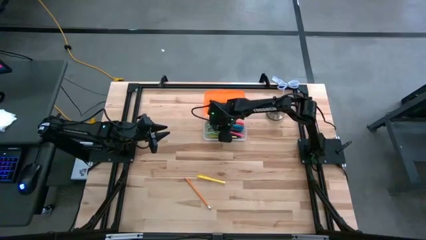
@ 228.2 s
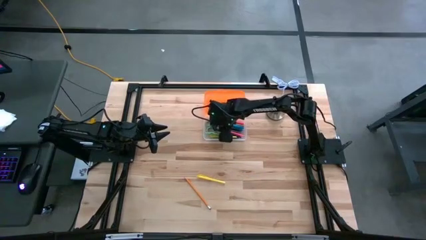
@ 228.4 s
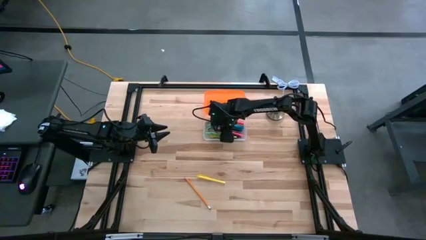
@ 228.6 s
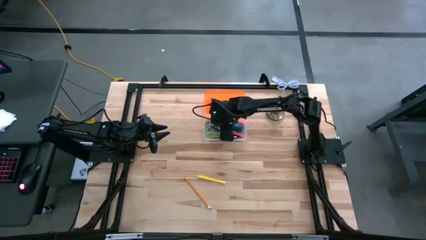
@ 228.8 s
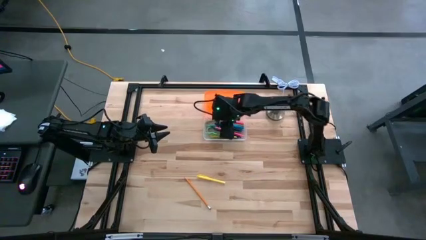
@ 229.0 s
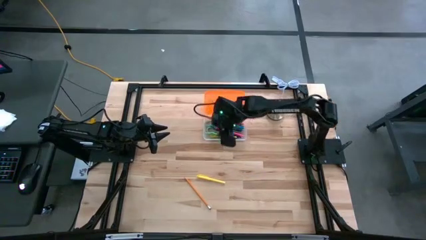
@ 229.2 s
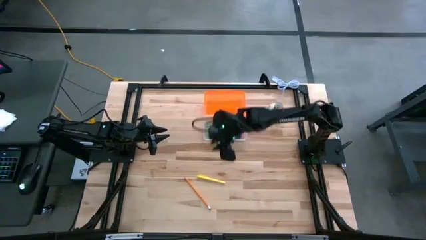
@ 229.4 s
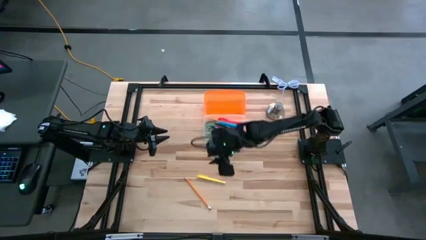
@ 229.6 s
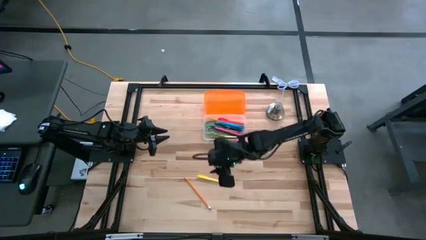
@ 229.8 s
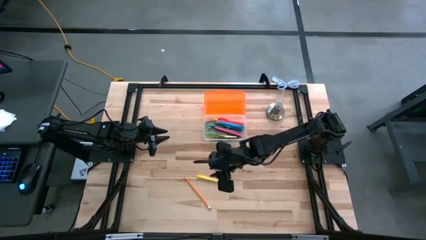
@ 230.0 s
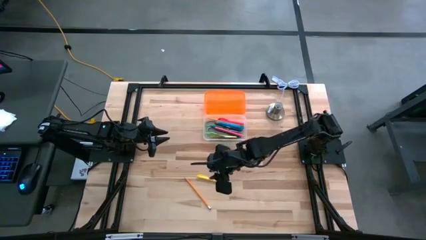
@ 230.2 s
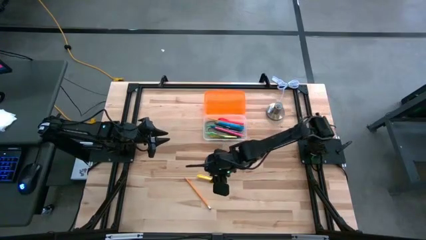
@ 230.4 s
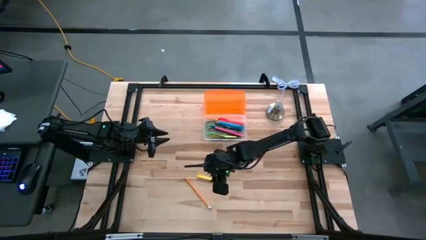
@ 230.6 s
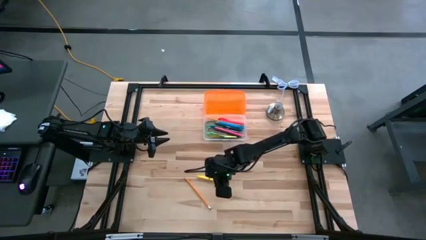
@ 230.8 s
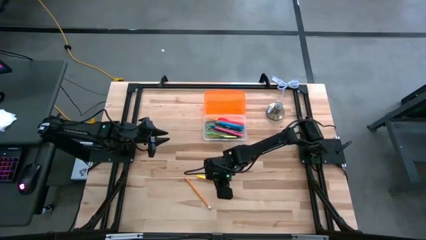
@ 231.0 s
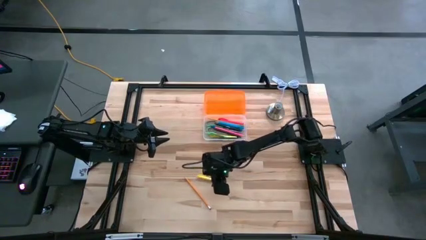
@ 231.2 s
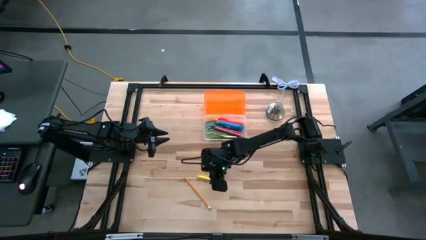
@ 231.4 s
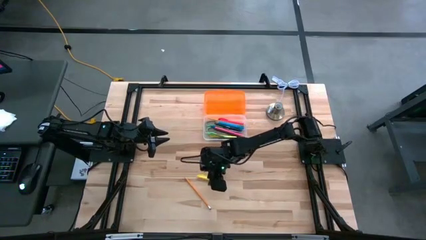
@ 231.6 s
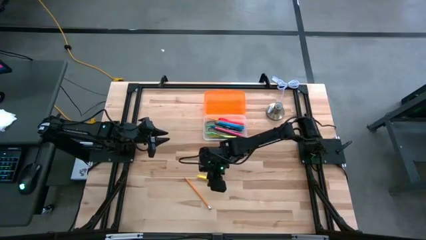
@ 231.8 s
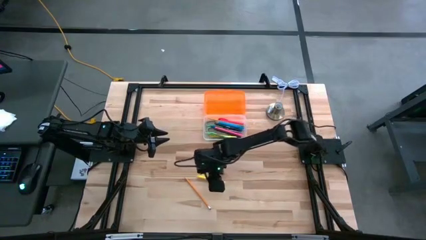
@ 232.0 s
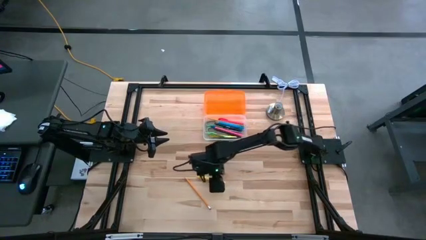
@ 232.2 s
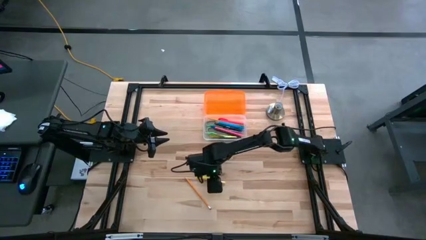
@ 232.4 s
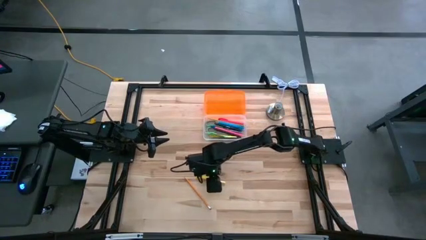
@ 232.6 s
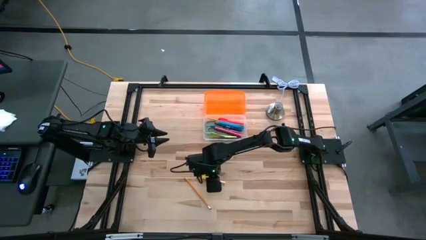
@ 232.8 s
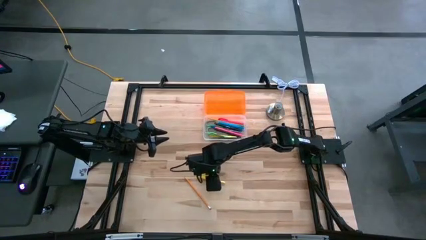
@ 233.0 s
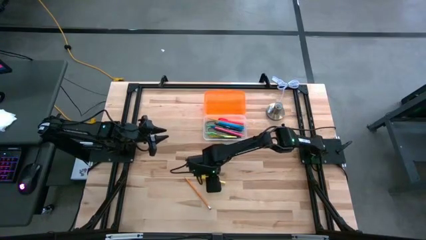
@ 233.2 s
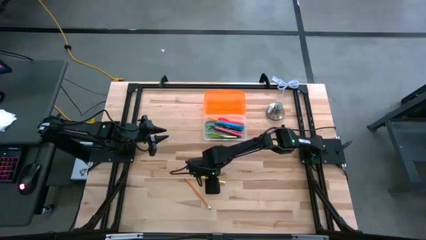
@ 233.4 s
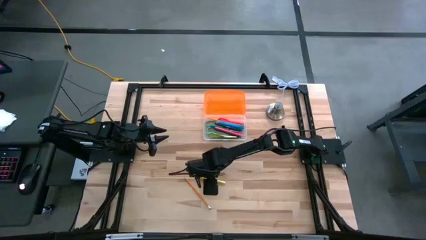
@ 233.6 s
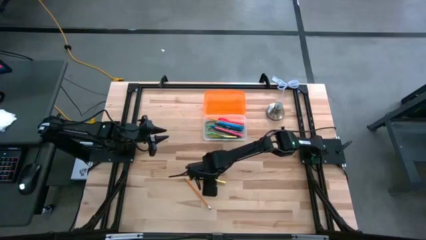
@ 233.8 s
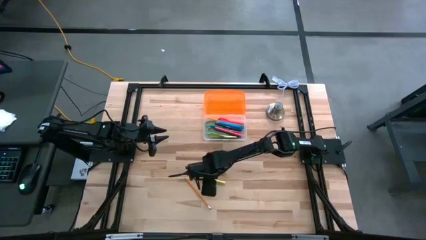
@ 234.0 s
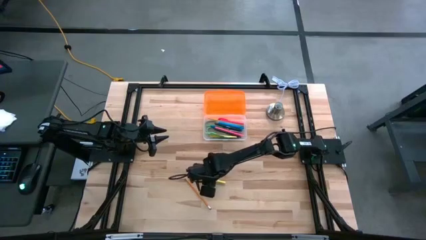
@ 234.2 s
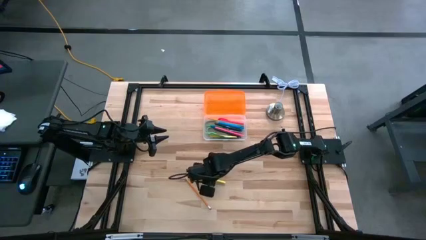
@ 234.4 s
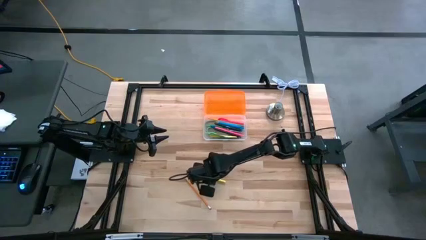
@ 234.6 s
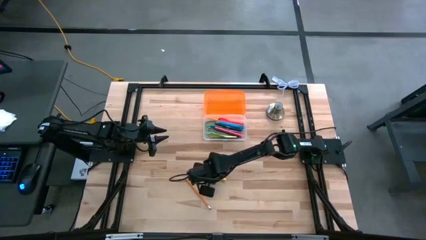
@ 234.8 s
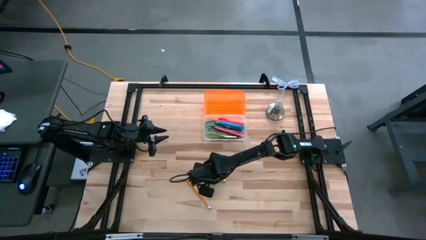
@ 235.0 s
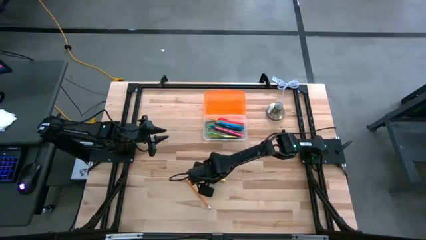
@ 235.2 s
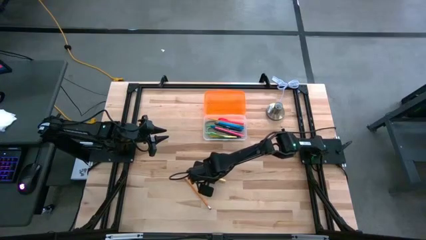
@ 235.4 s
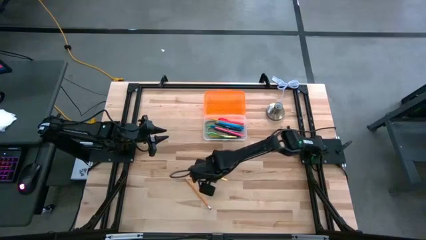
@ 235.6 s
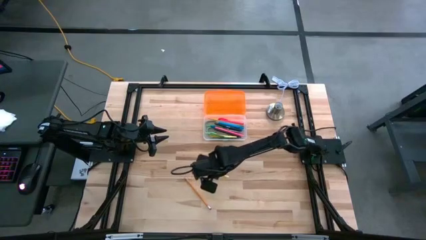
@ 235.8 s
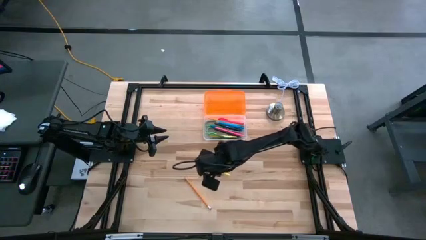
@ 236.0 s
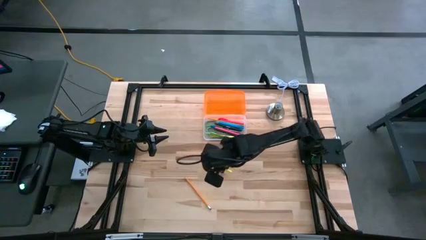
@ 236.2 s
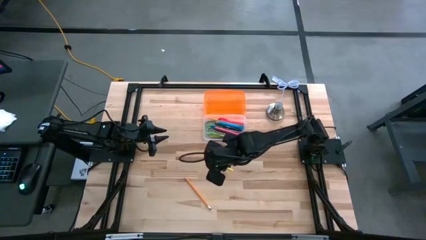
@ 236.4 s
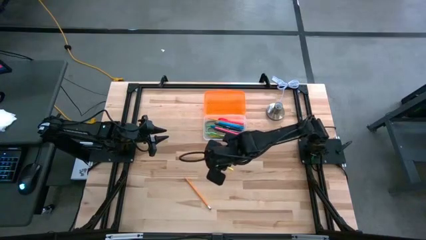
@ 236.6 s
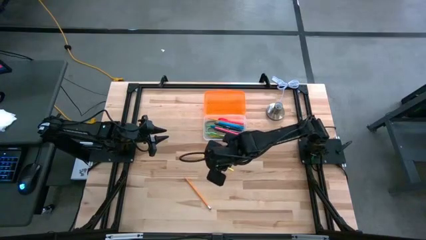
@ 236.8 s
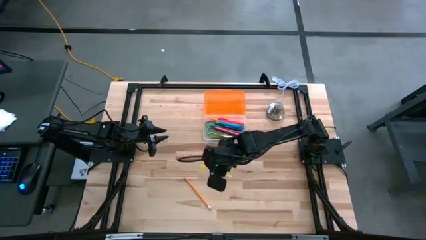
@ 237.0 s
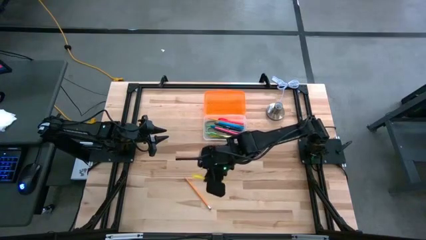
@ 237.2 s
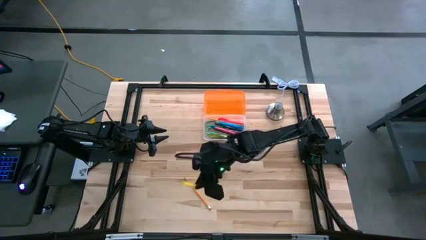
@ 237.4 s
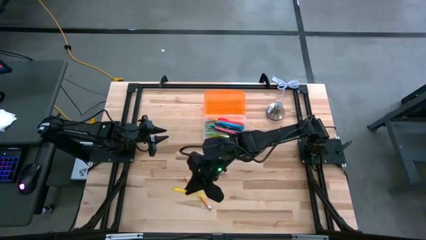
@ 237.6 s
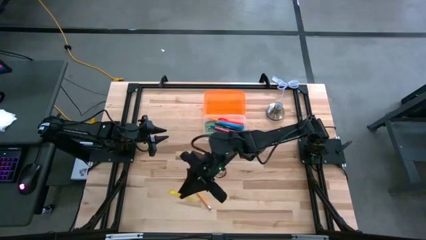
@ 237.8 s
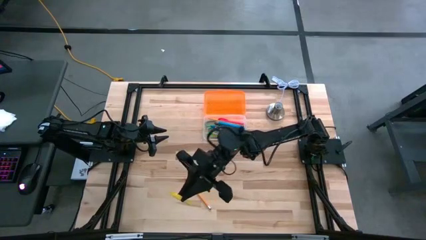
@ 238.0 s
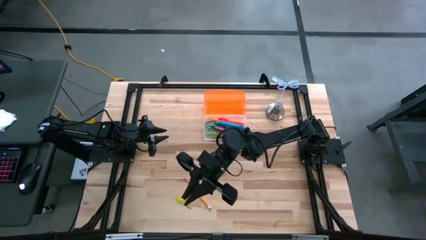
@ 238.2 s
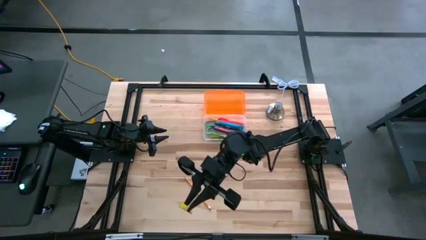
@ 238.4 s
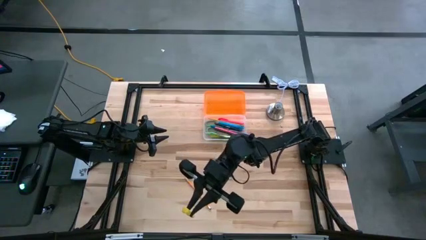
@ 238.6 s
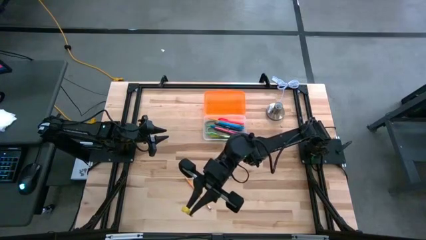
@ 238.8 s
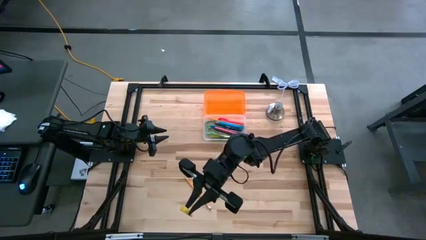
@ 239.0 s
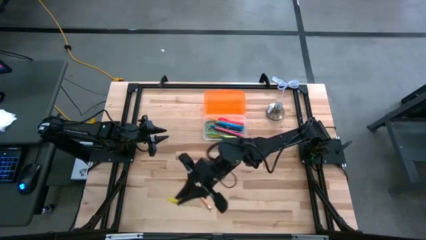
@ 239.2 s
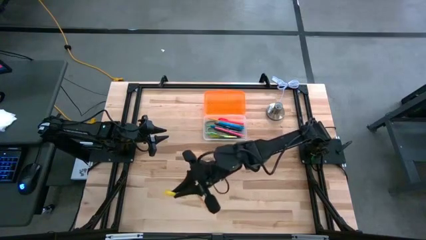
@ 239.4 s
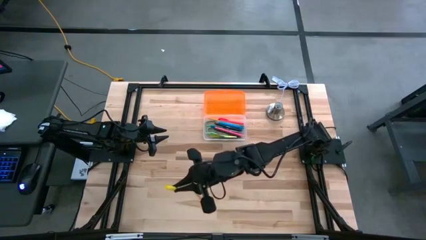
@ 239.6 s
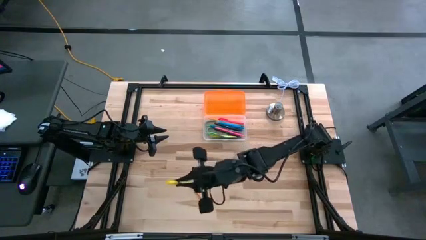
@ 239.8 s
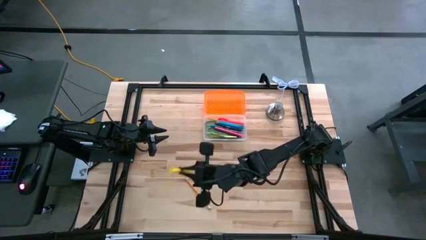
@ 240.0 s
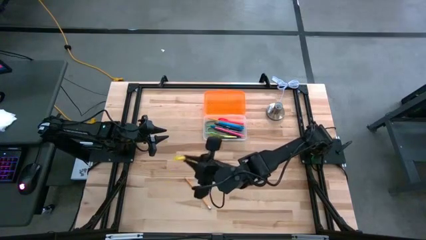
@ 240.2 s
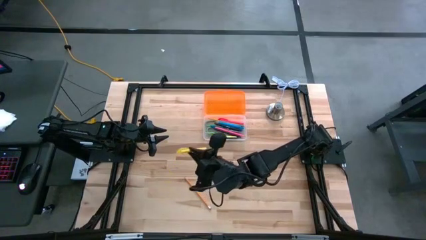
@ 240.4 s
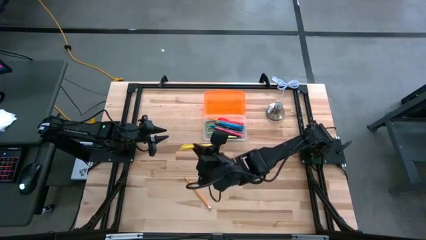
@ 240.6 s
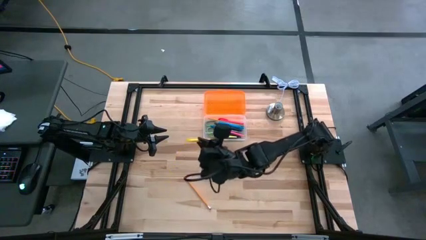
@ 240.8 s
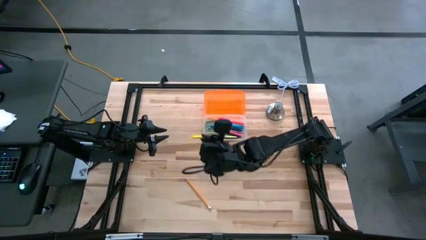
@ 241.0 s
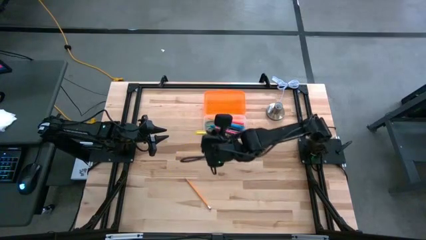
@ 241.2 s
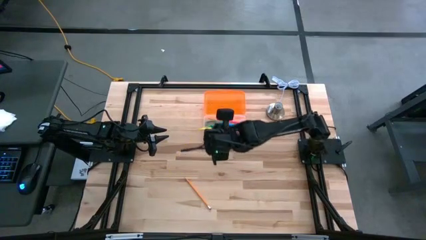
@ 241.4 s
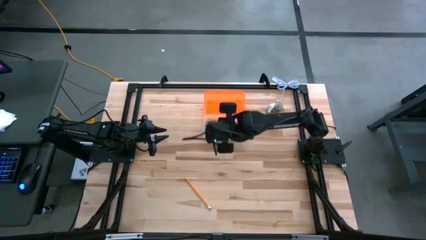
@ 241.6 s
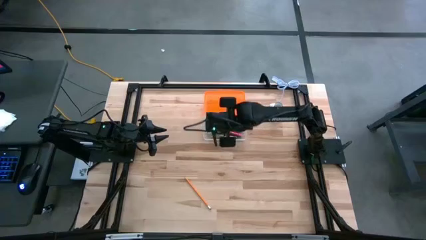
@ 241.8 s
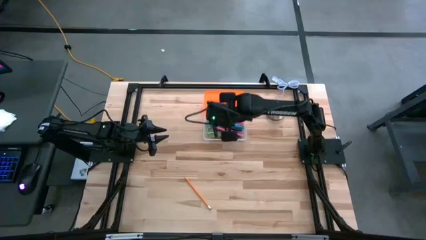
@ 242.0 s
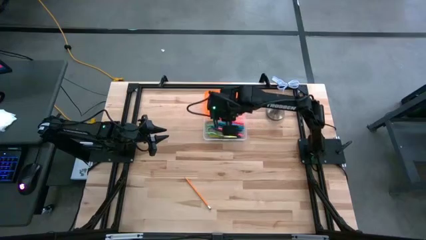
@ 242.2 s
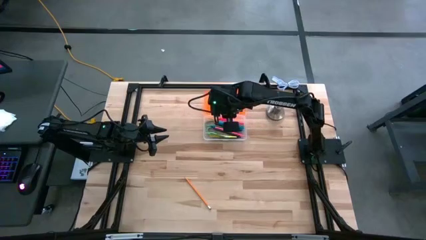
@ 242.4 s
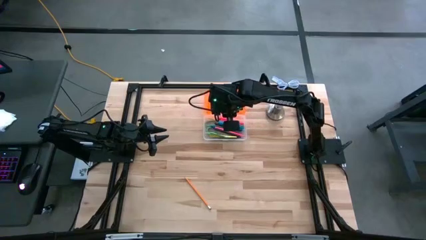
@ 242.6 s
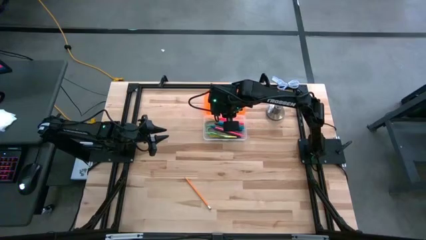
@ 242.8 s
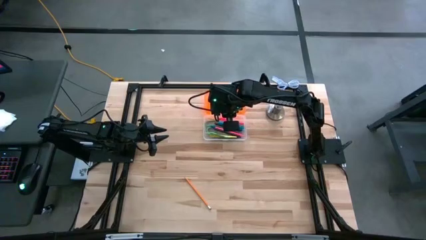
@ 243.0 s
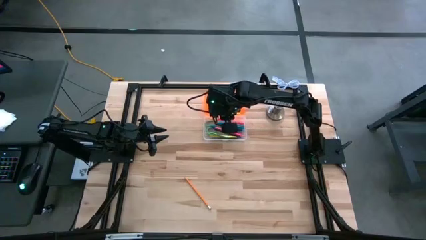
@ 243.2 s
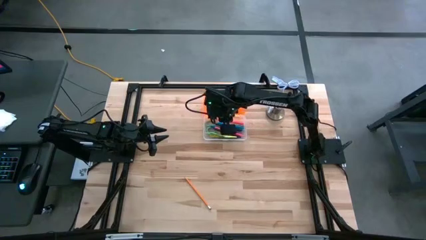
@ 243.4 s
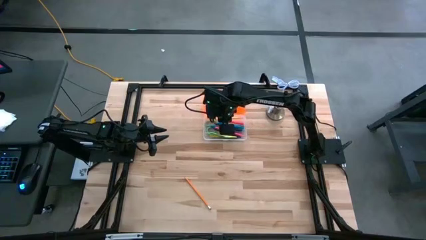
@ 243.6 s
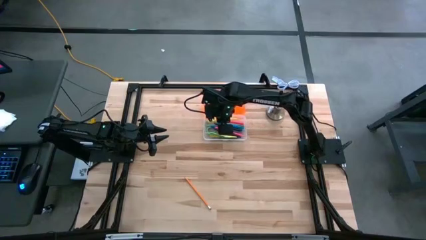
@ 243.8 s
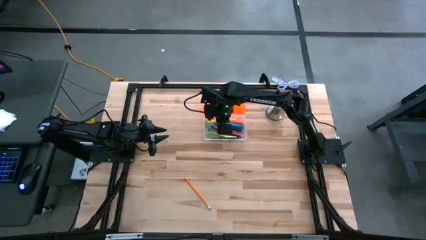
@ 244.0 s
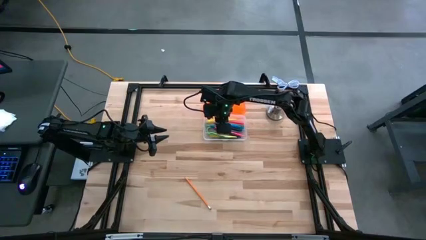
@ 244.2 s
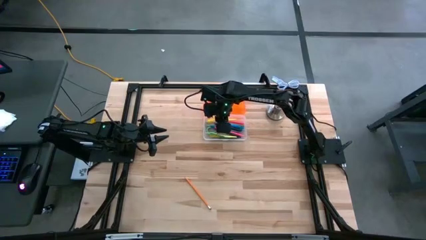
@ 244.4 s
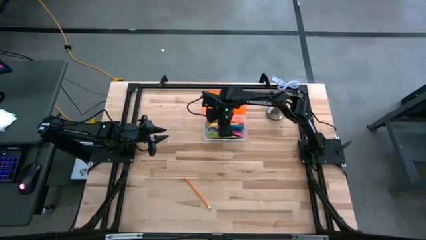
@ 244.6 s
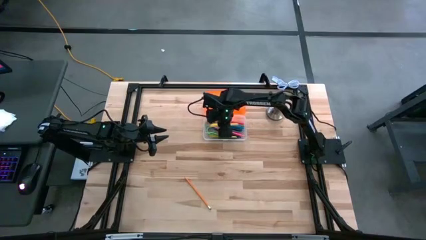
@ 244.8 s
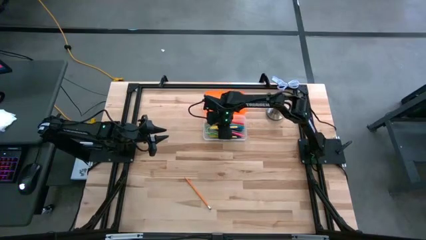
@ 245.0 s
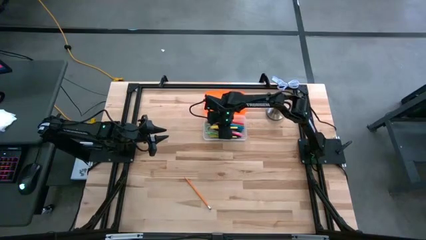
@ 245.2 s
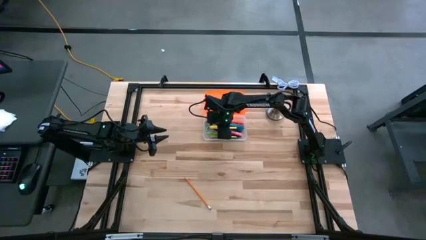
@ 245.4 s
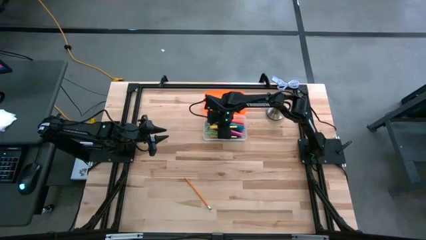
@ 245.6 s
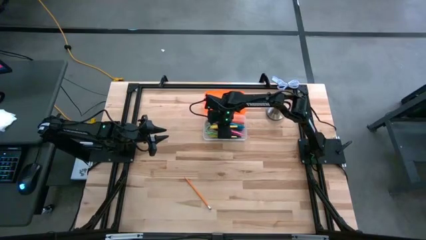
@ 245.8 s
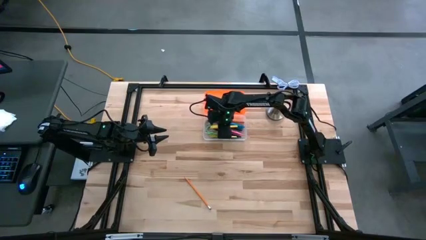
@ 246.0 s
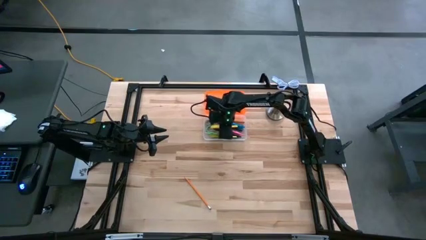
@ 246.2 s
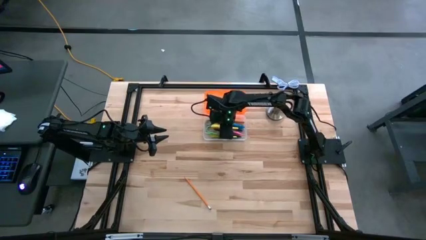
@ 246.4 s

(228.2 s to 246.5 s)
Task: Pick & place school supplies into a supply box
Put the yellow highlighter into the supply box
